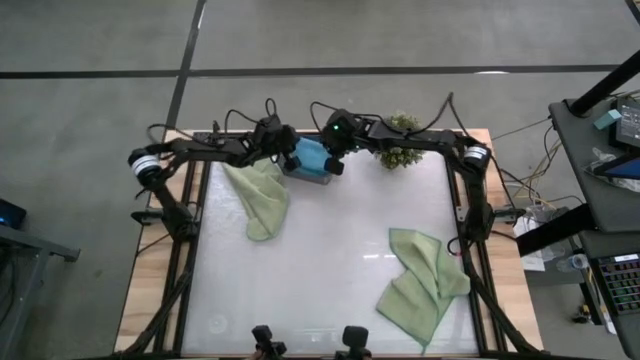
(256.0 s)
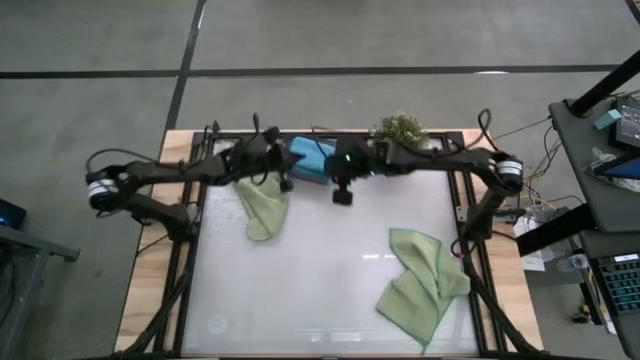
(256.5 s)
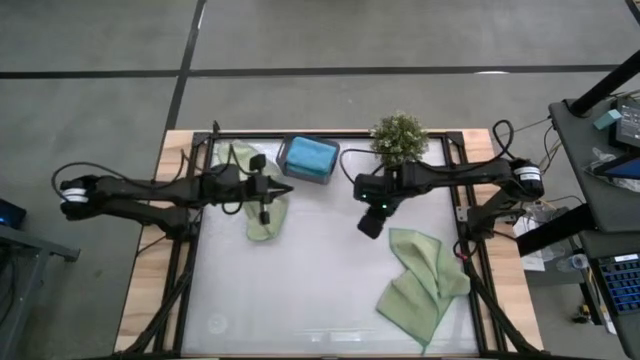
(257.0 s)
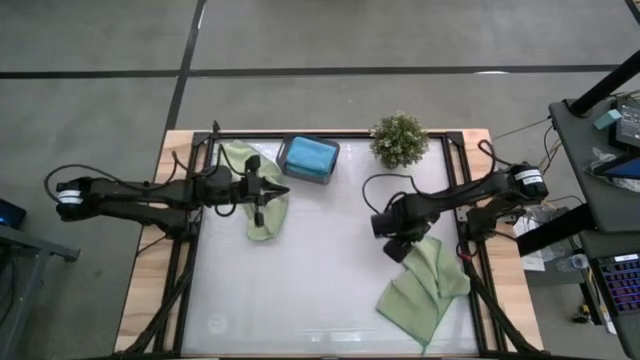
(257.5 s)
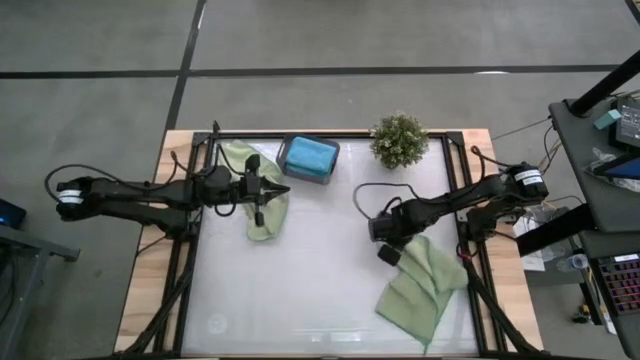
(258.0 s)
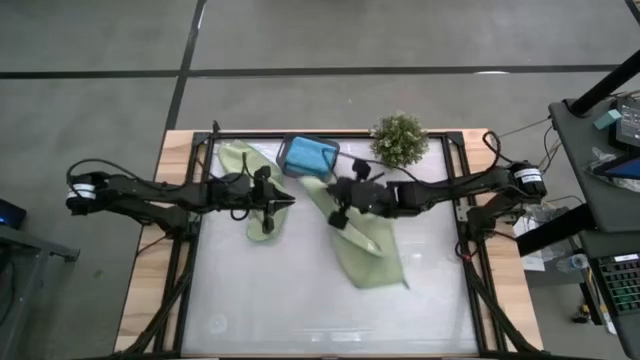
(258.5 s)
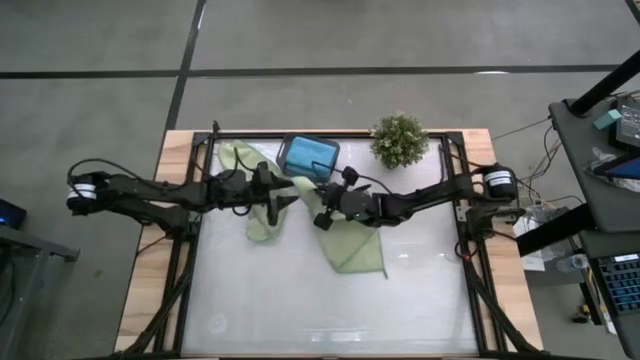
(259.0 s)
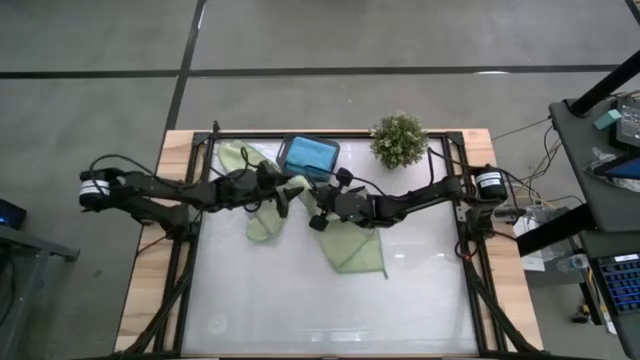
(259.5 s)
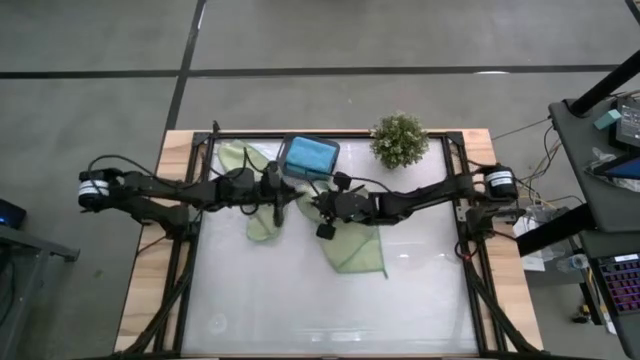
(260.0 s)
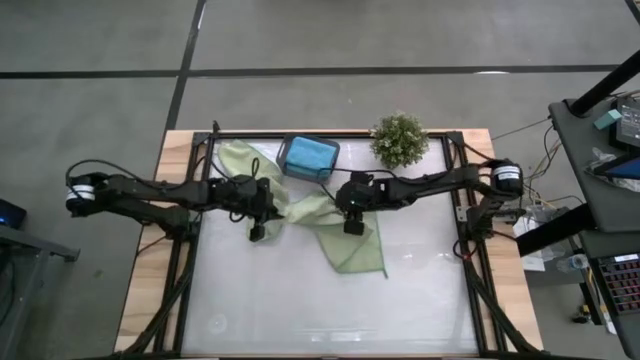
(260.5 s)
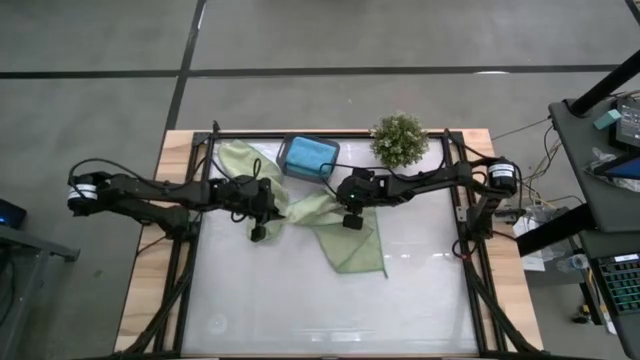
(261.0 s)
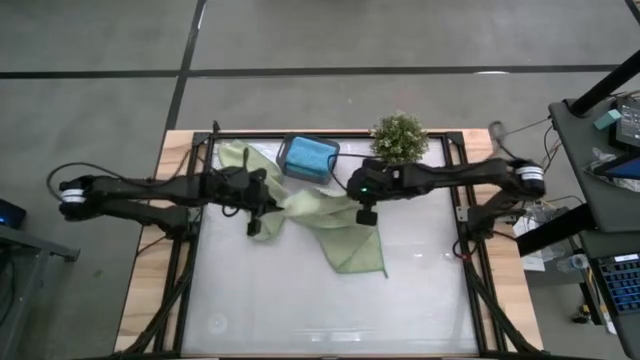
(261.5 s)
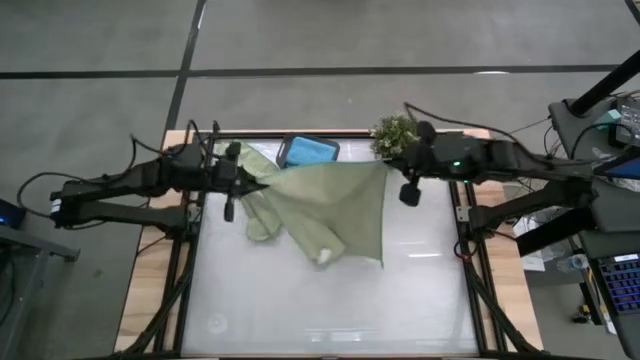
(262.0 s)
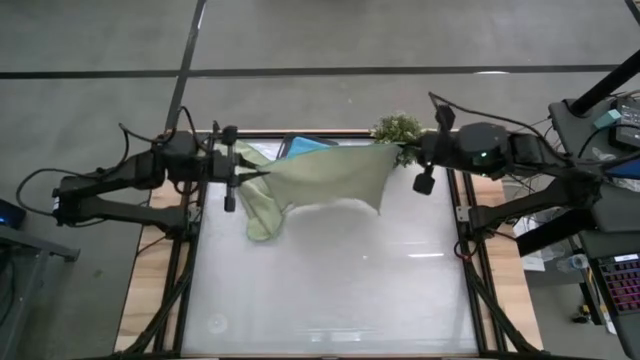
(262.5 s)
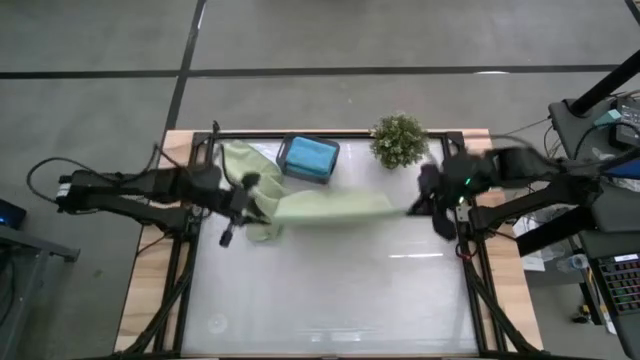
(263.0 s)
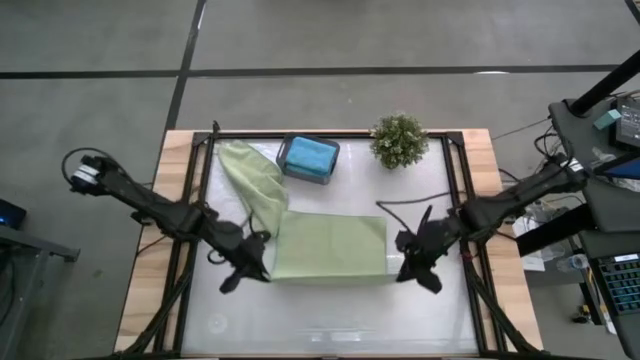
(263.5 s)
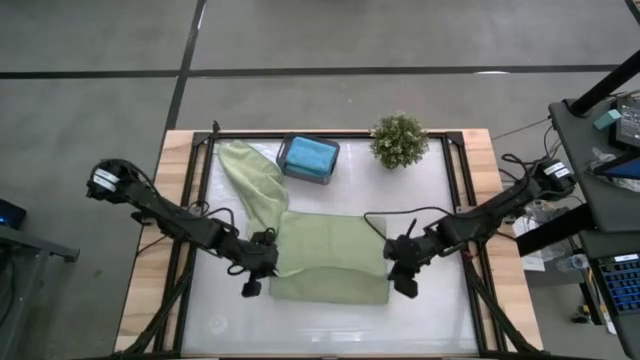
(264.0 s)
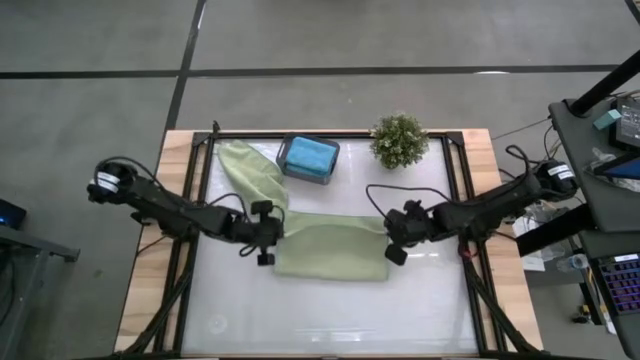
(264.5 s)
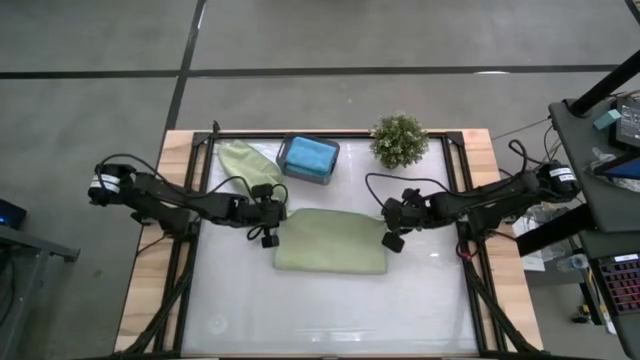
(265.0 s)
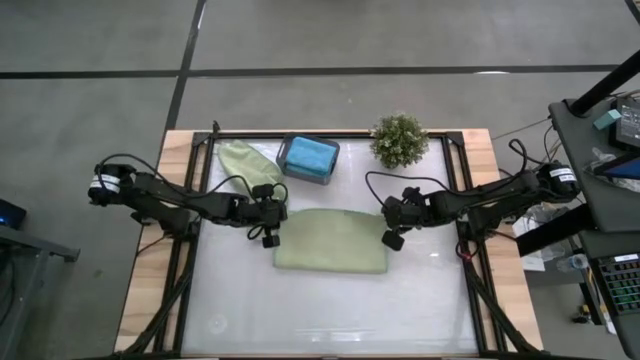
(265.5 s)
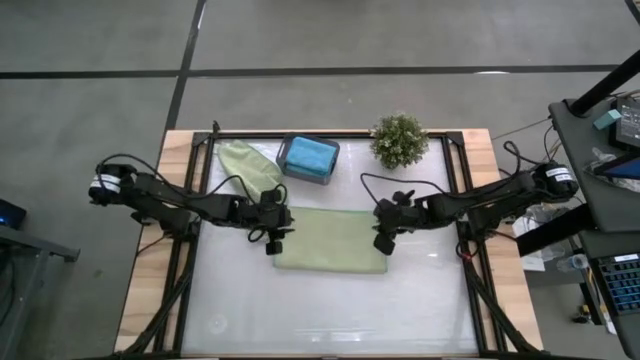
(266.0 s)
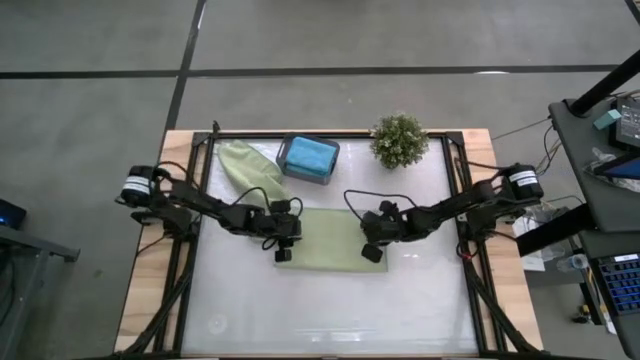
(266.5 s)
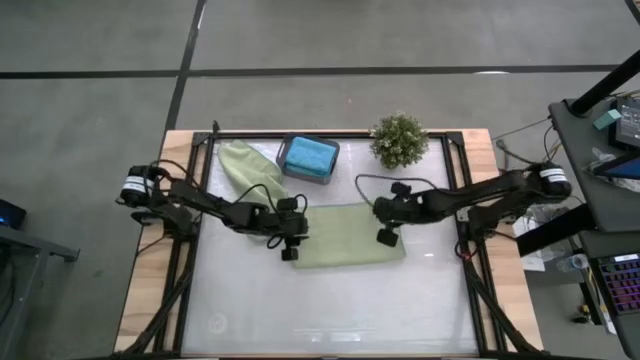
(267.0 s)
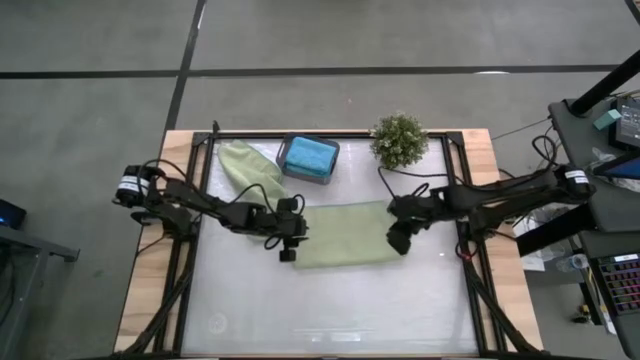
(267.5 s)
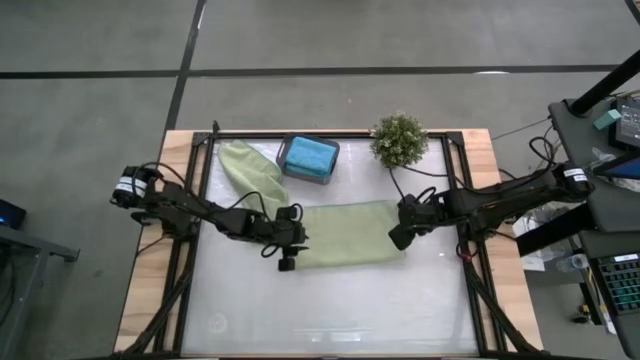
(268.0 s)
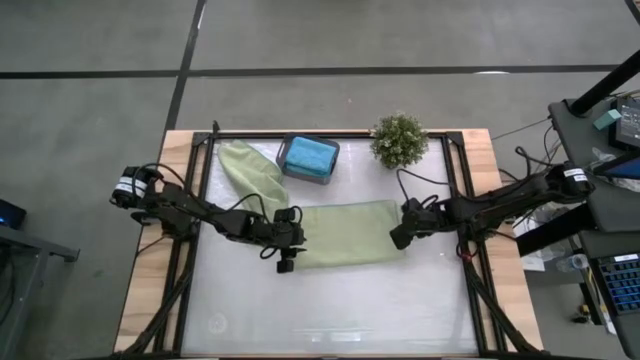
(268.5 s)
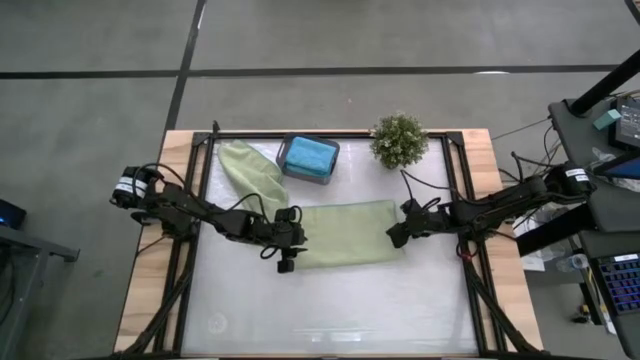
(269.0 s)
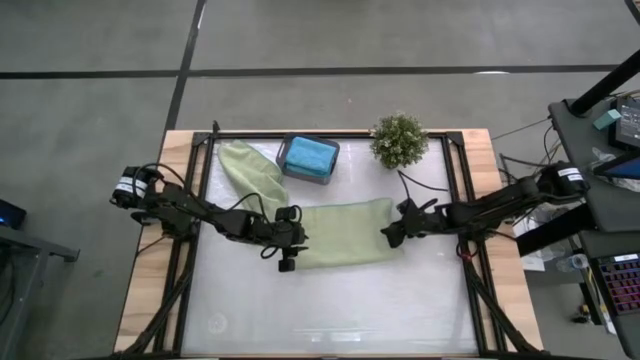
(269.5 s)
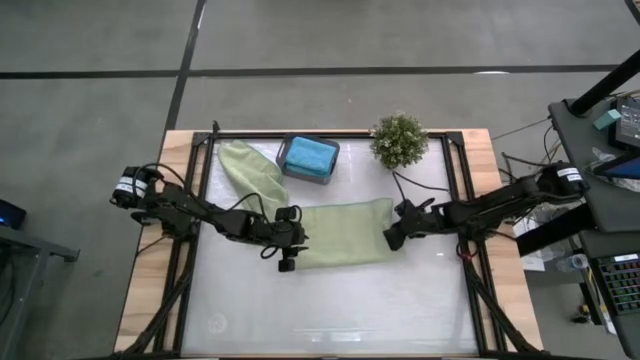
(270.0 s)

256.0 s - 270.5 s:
Task: Fold microfiber towels
Fold the bottom green microfiber towel

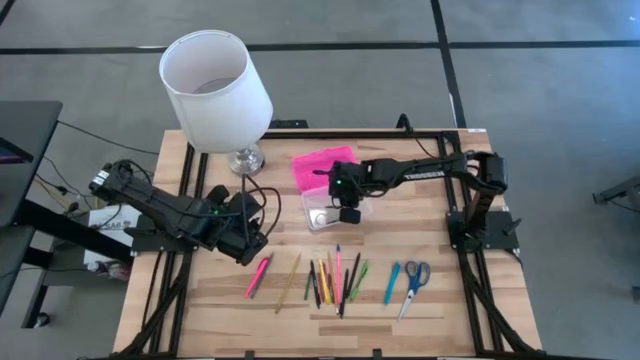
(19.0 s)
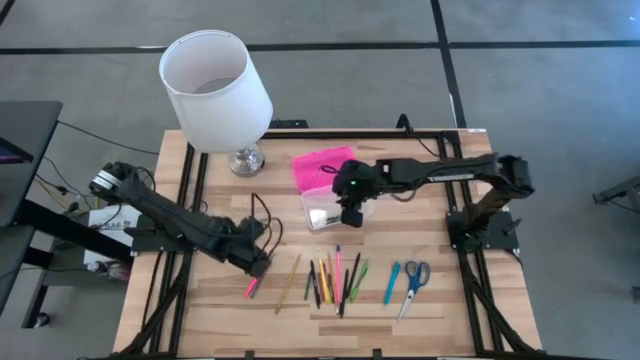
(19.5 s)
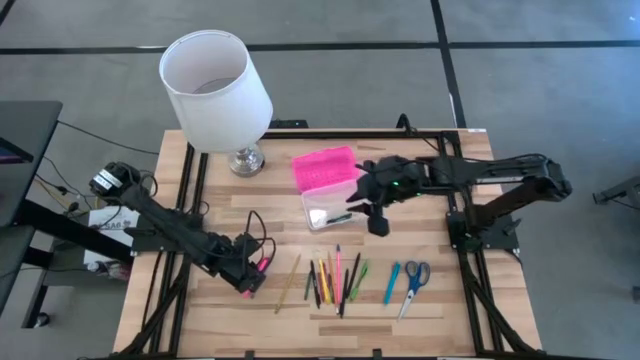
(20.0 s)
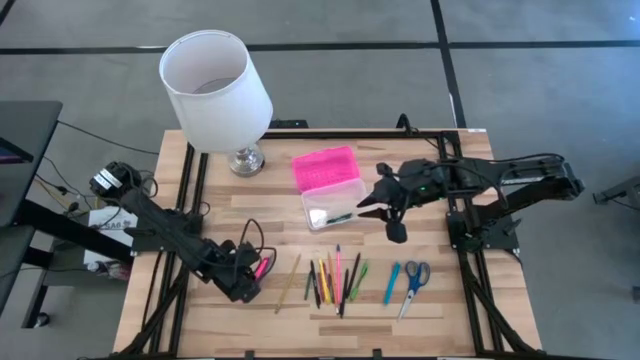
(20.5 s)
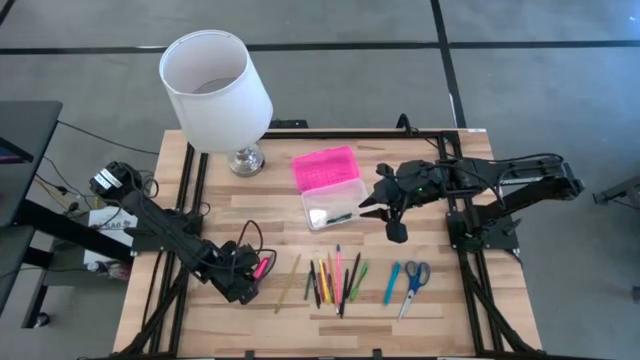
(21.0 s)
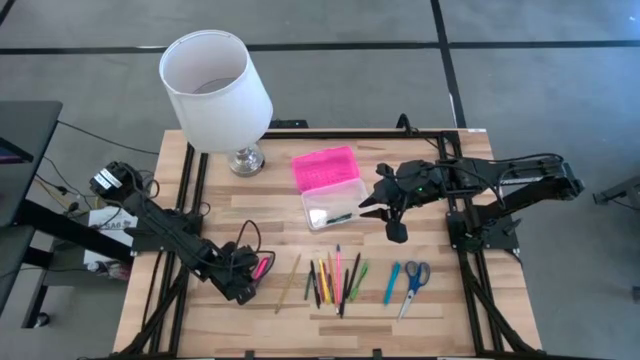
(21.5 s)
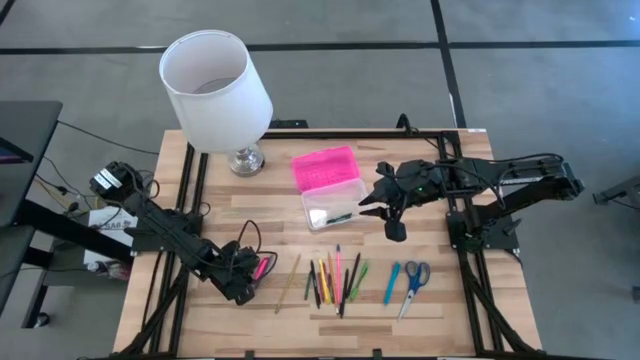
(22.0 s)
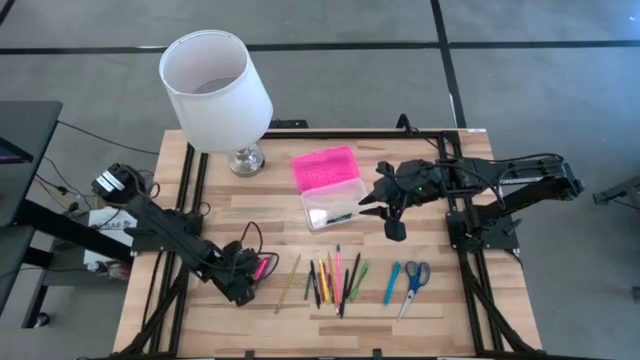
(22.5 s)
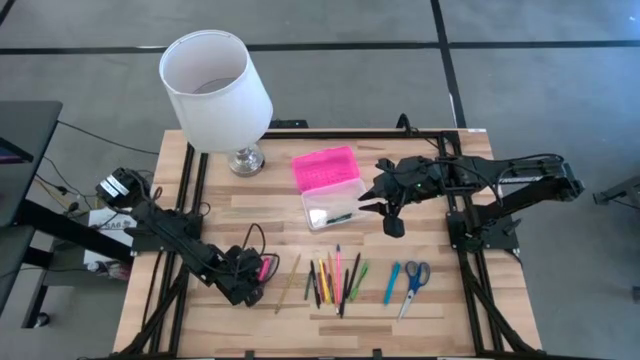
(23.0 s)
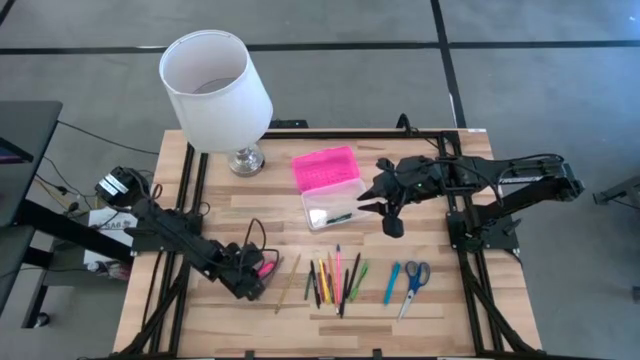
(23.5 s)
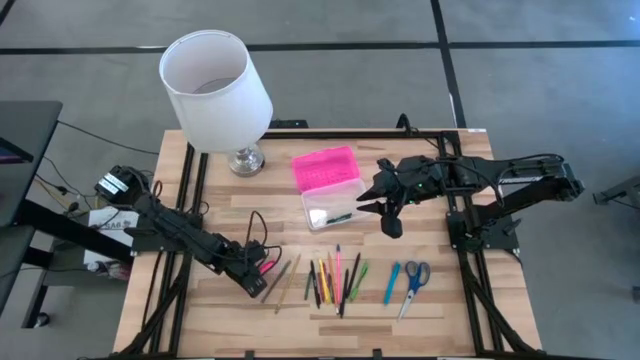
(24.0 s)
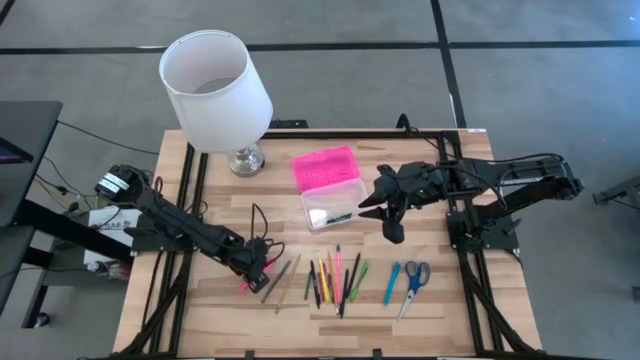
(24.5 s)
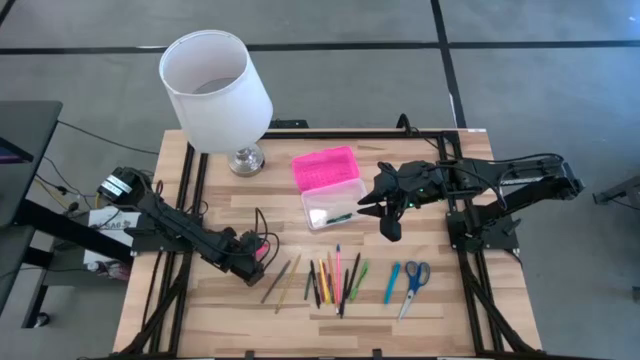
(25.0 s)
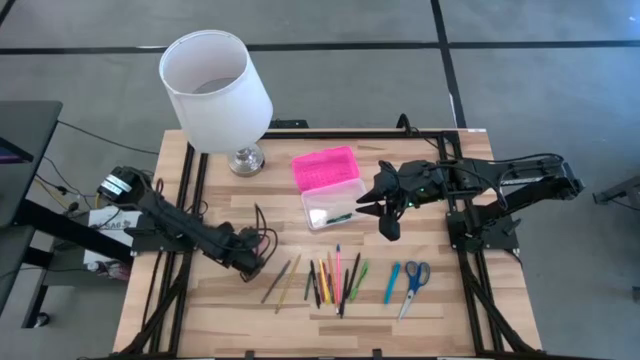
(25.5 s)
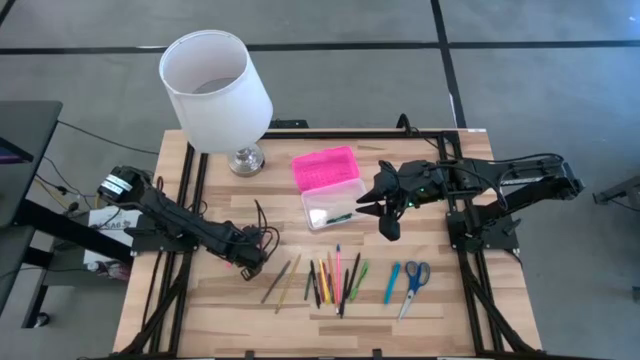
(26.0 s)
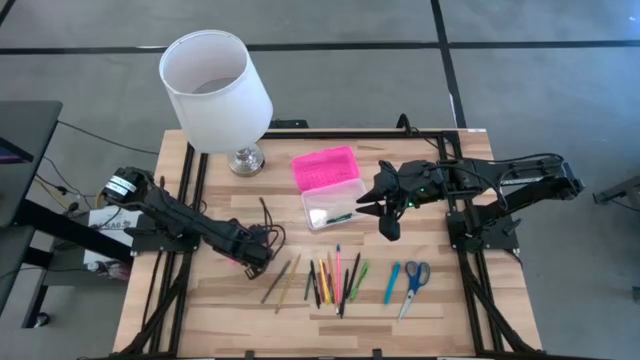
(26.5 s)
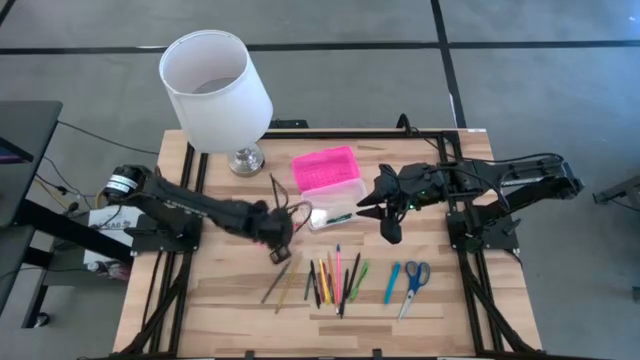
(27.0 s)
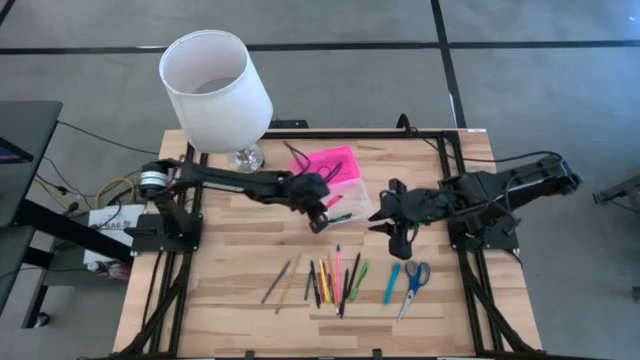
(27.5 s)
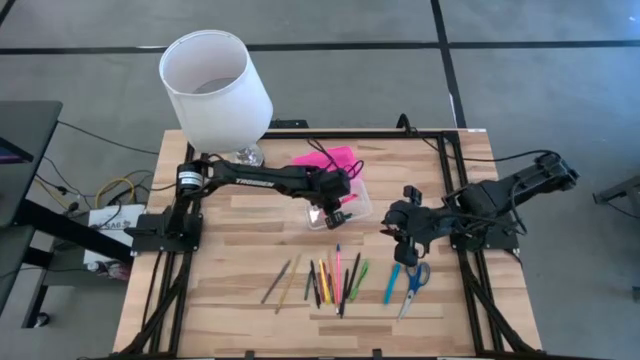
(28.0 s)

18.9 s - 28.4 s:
Task: Pick & place school supplies into a supply box
Put the pink pen into the pink supply box
